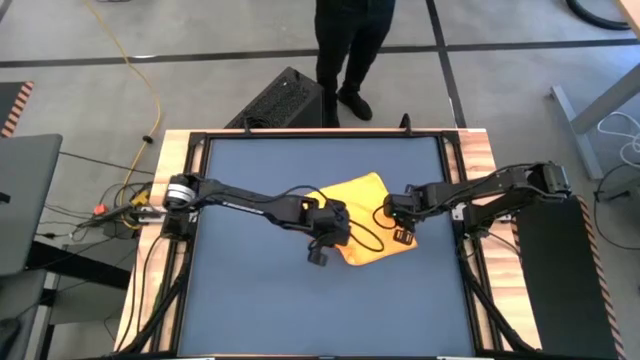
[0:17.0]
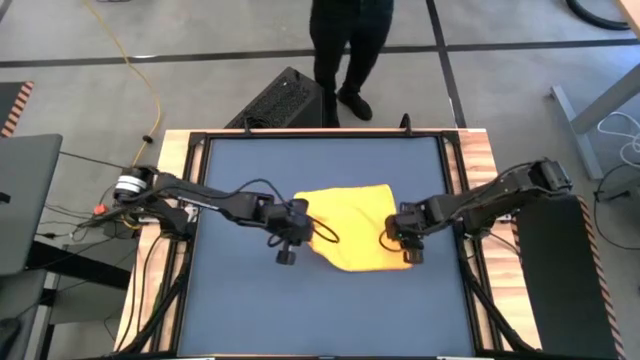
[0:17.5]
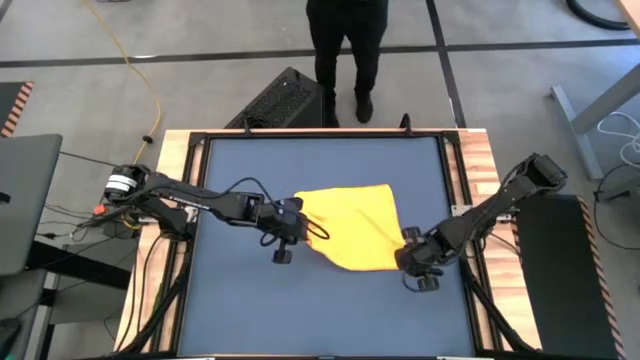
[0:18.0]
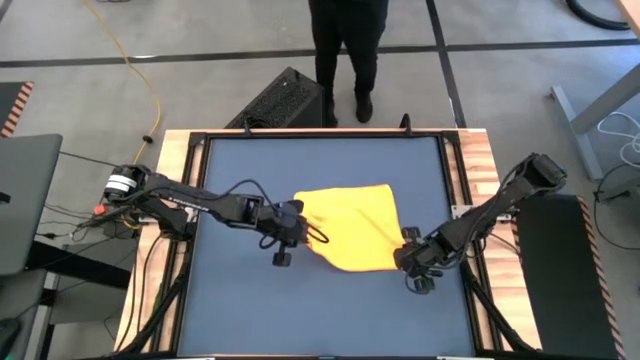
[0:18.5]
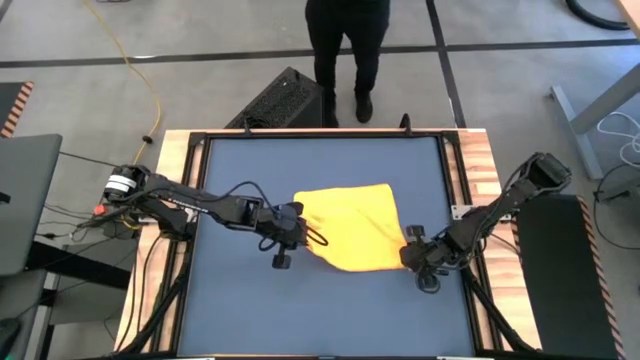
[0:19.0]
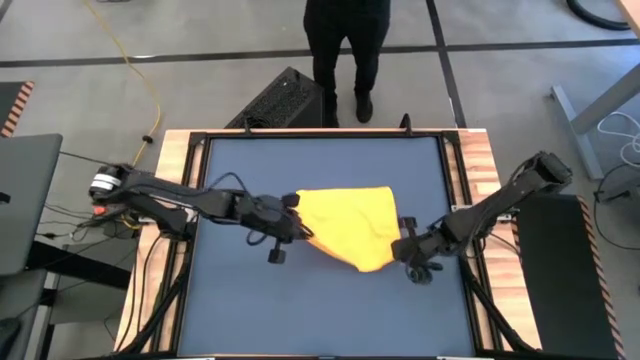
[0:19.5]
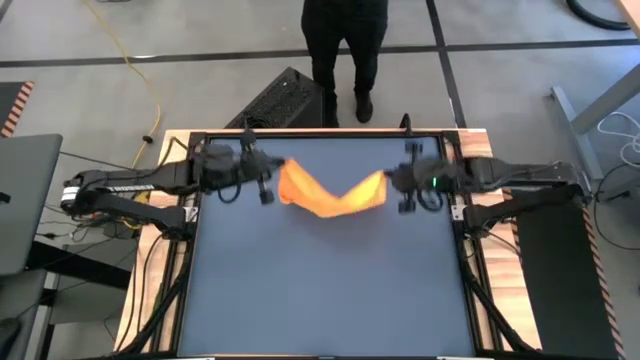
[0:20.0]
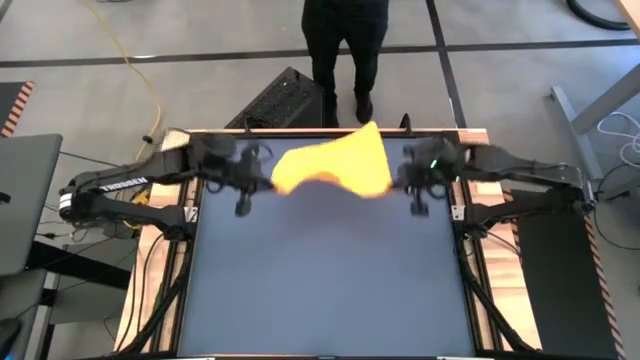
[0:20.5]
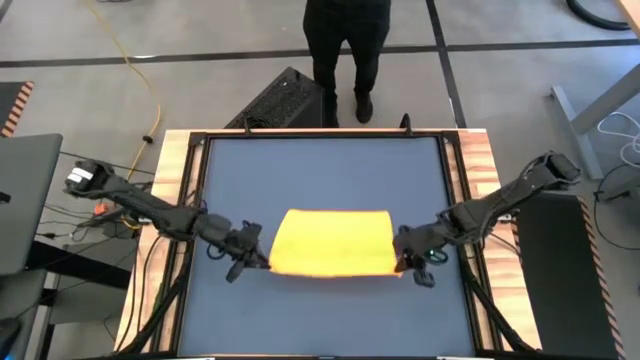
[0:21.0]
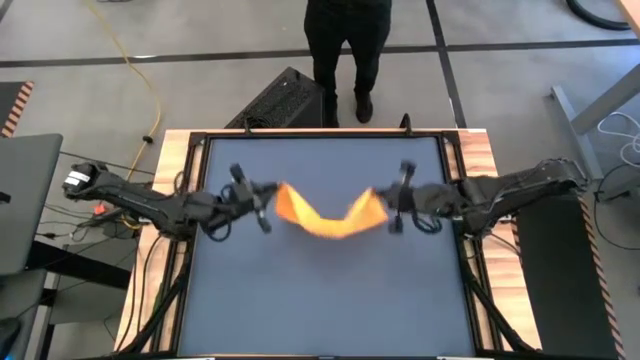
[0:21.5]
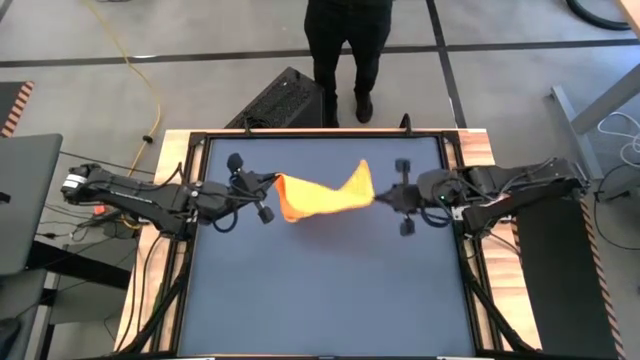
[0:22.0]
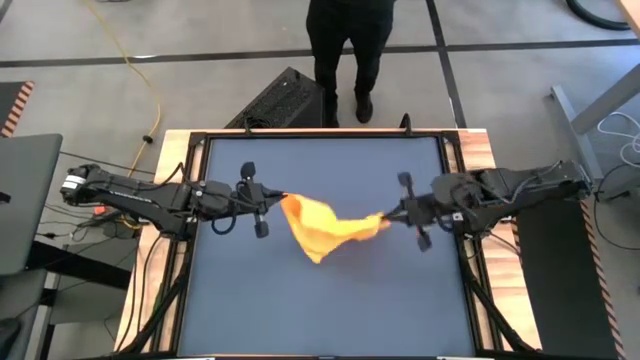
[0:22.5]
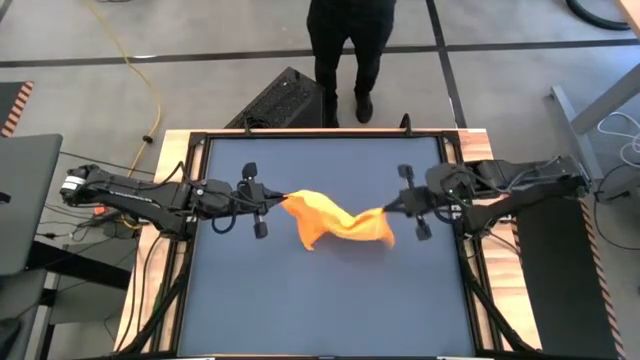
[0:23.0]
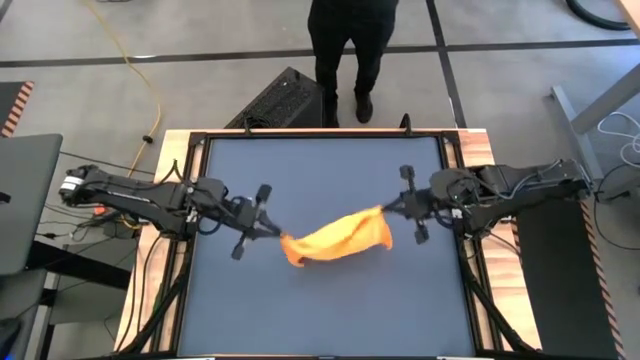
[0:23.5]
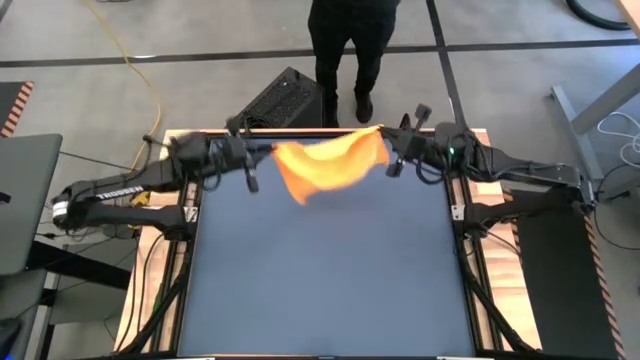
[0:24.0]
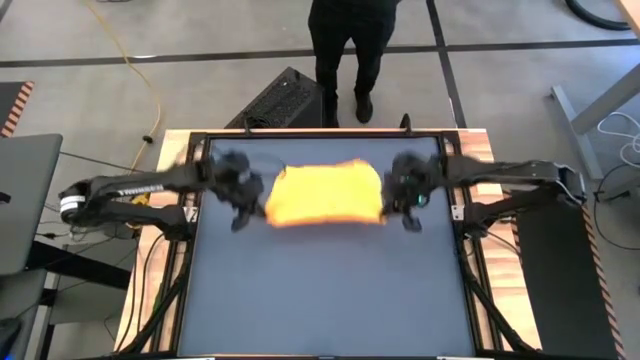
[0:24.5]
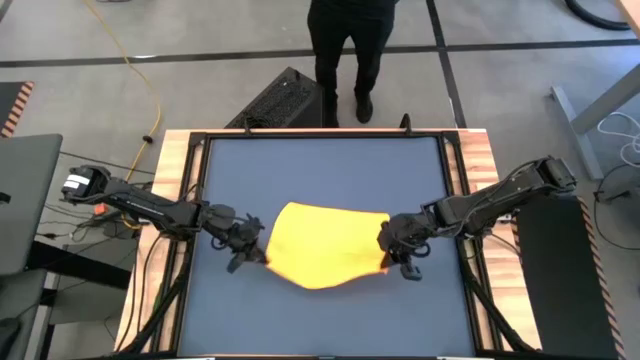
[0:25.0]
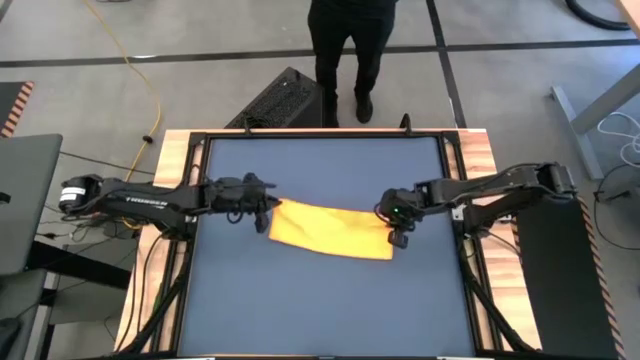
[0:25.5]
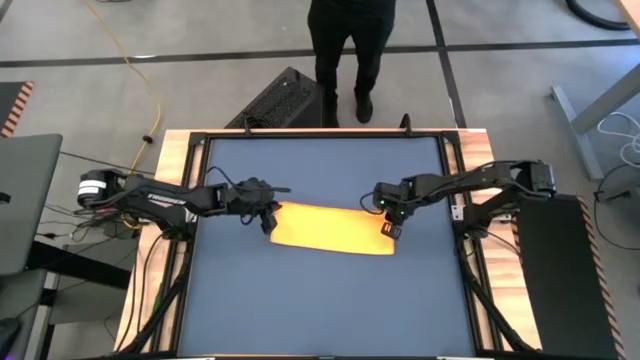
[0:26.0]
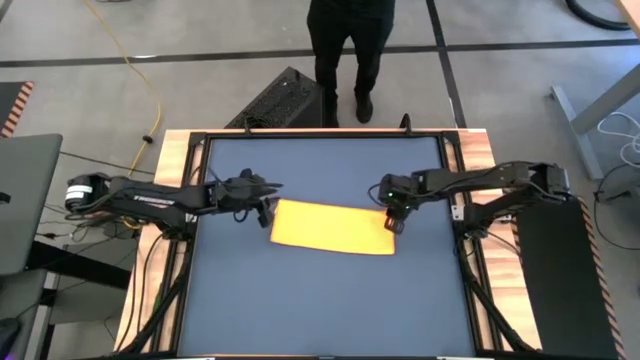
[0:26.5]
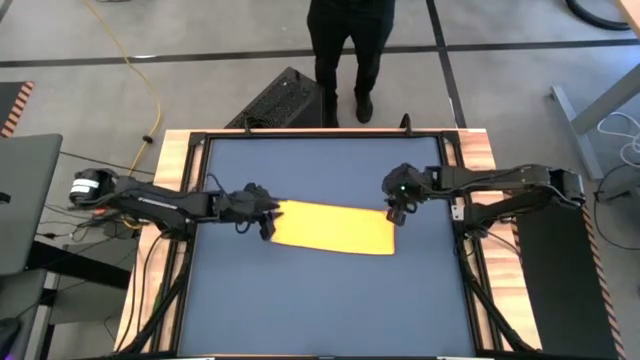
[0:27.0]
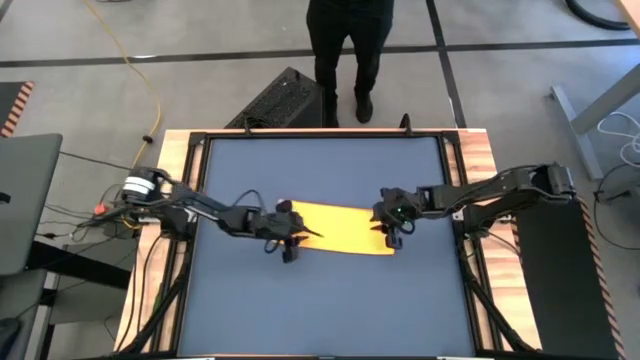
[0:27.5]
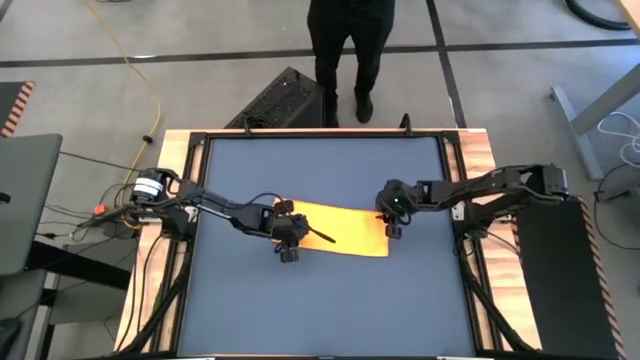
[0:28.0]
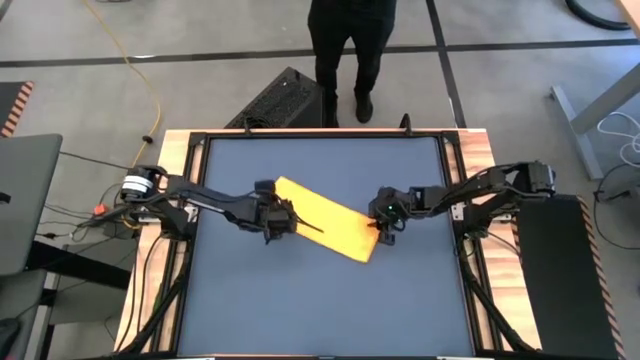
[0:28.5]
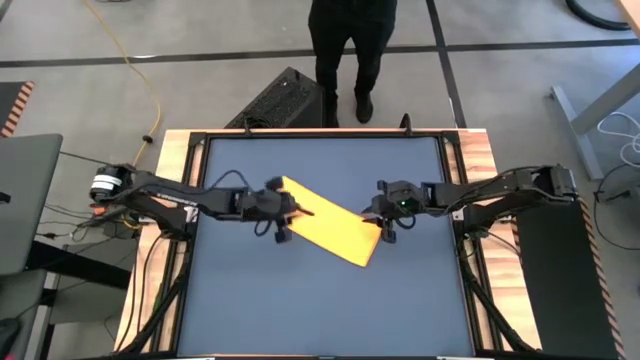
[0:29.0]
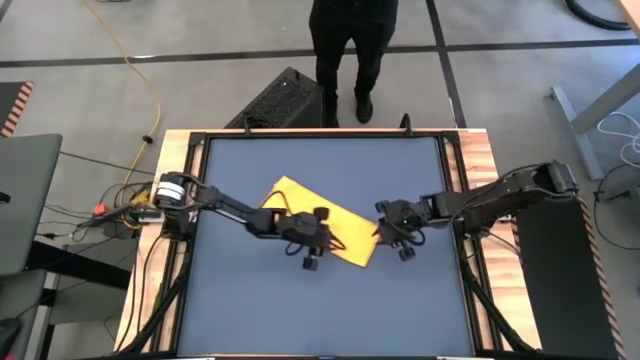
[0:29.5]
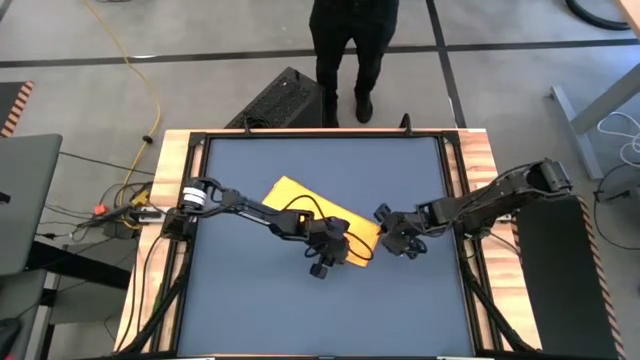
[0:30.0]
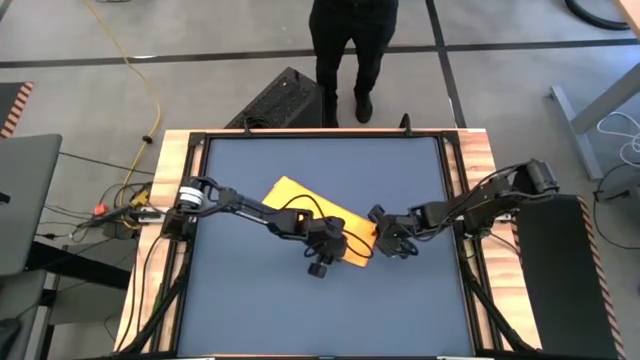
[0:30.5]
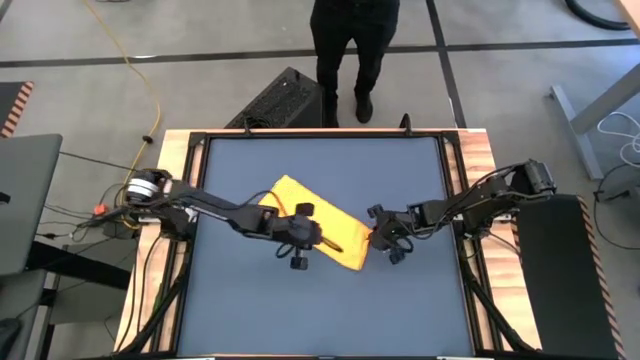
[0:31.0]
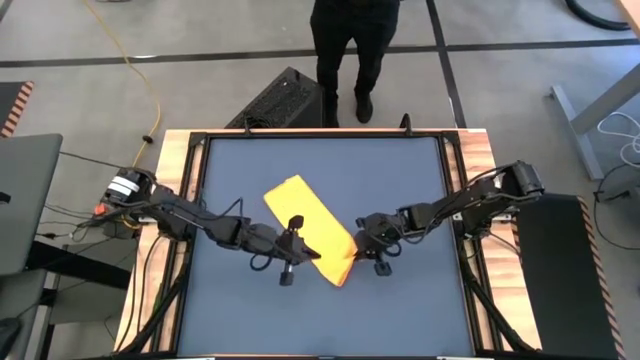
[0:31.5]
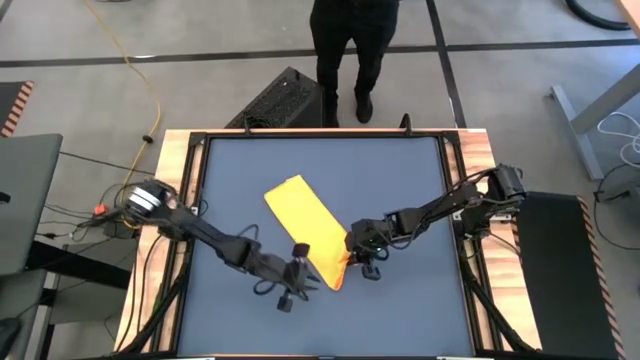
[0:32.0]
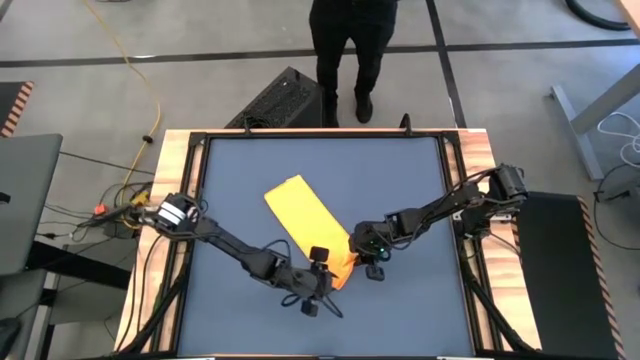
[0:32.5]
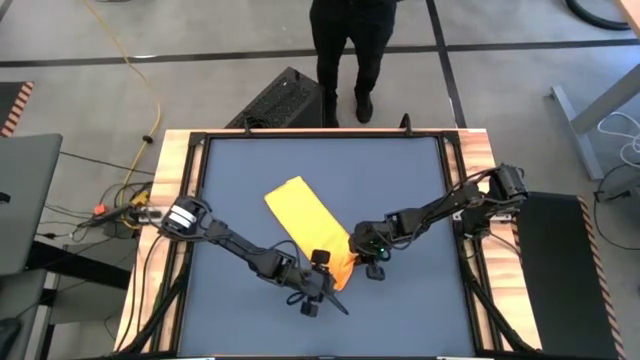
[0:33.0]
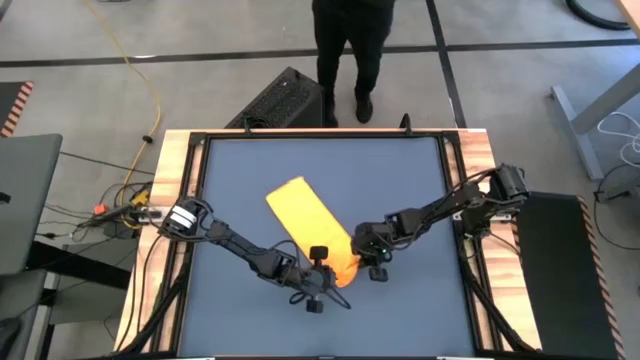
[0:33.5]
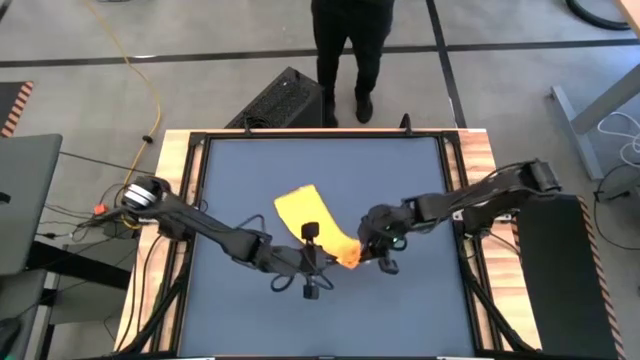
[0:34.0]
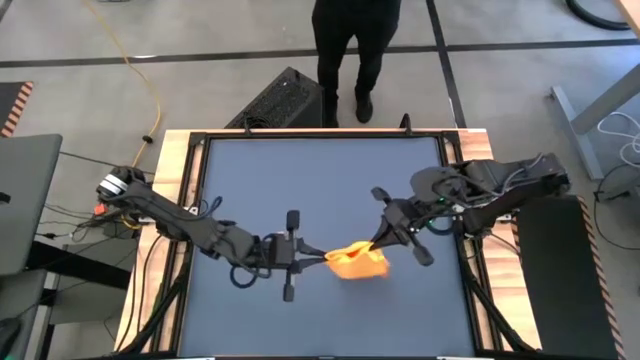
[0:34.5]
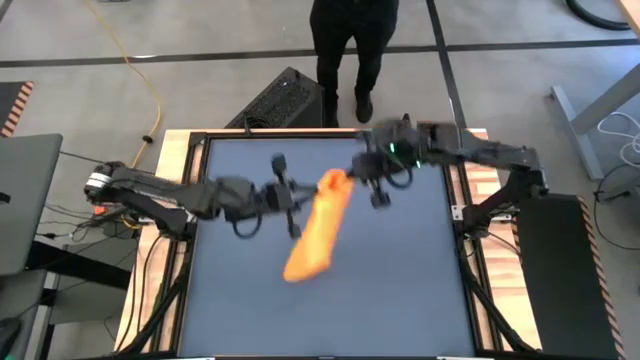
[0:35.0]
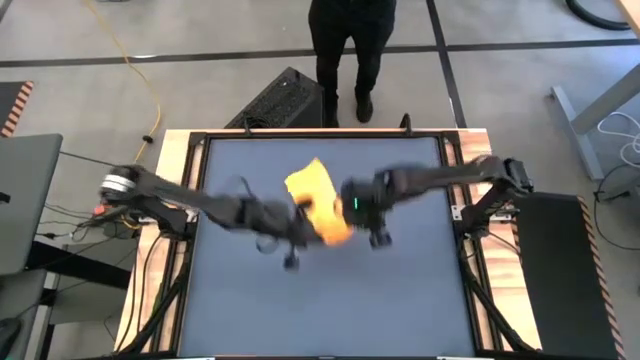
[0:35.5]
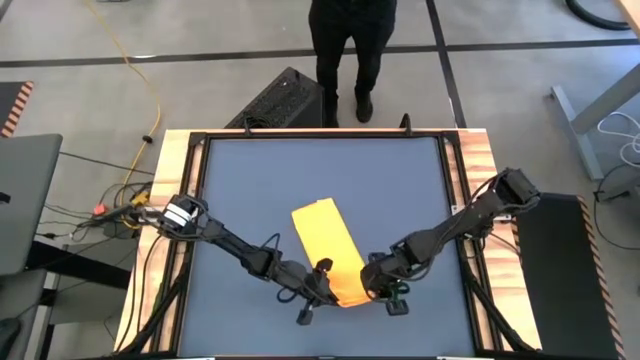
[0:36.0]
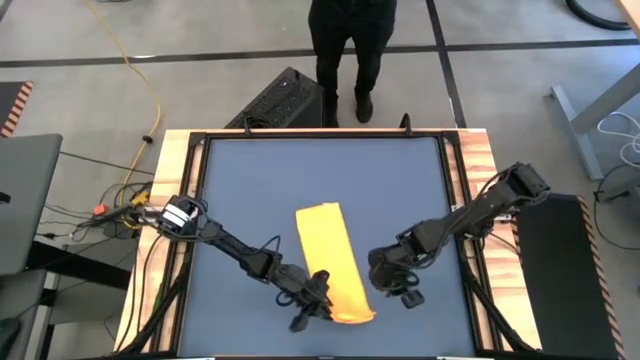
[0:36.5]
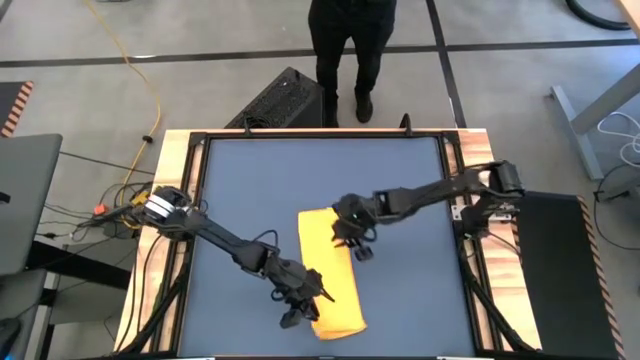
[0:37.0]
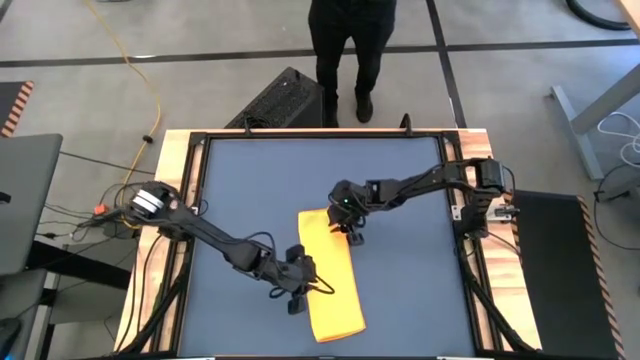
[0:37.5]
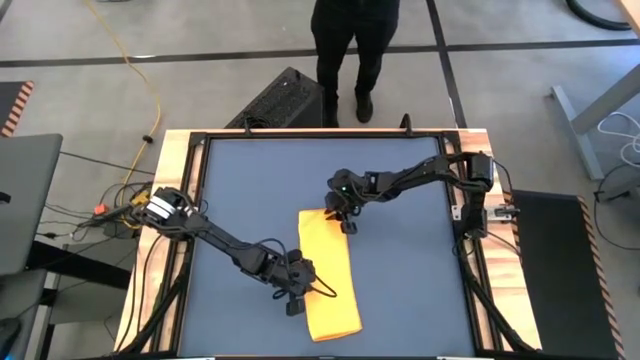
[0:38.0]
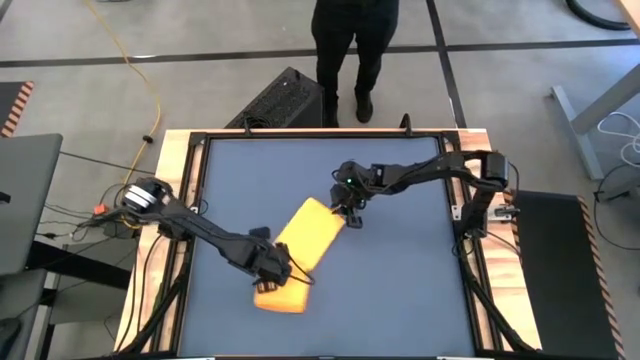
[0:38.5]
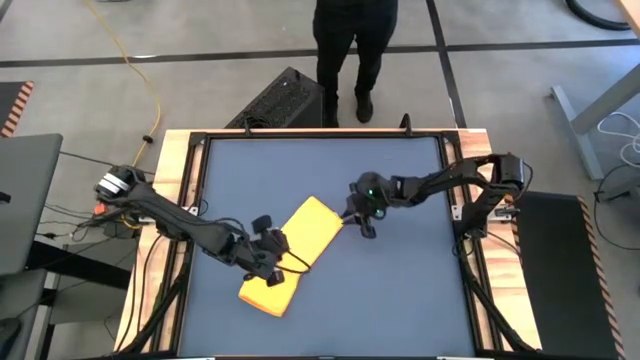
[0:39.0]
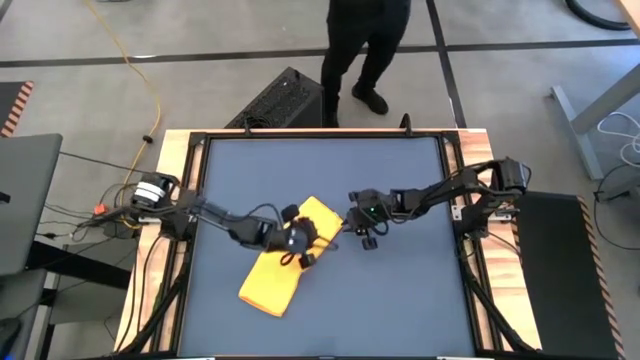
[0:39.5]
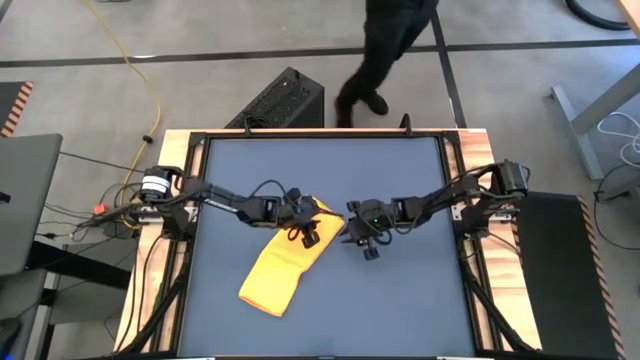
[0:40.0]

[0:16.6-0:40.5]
Task: Roll towel into tight, uniform cylinder
Roll the orange microfiber towel
